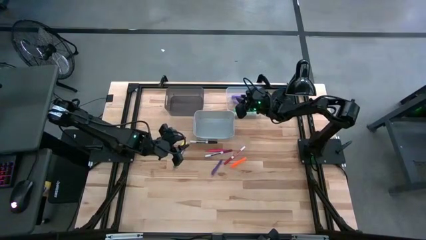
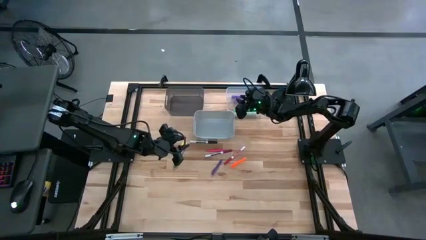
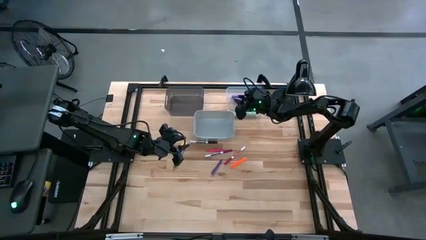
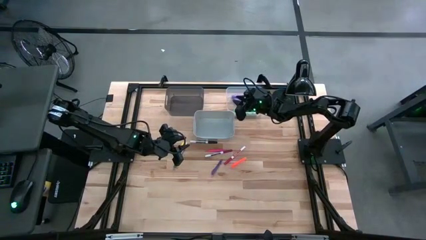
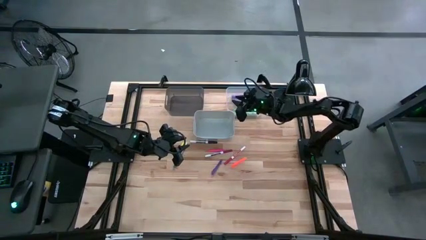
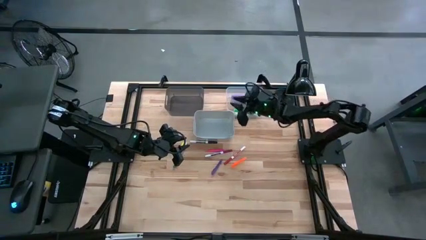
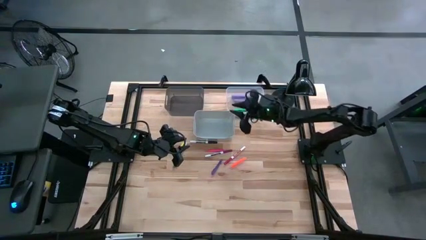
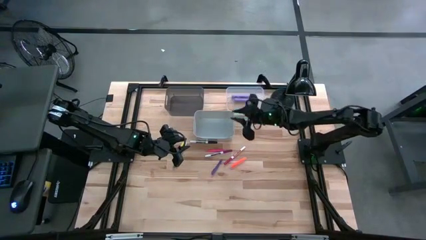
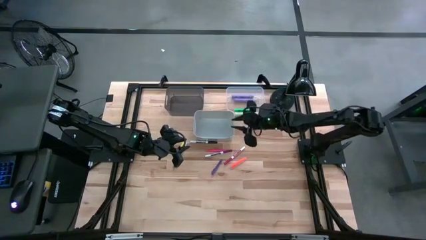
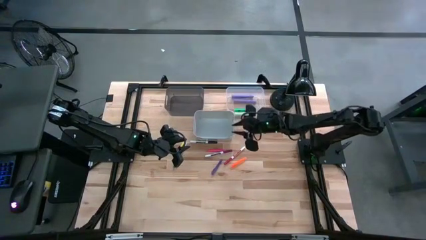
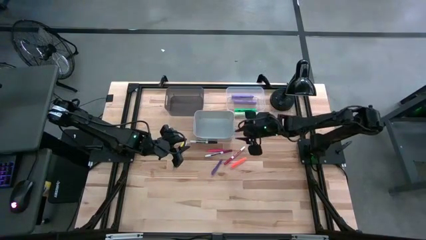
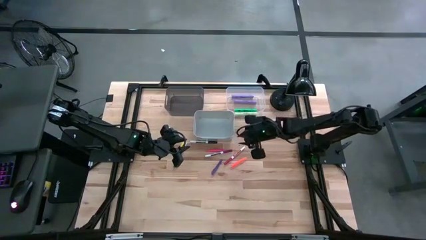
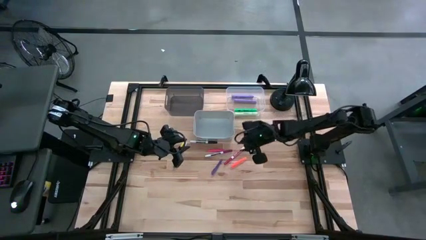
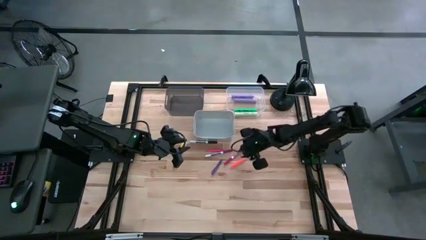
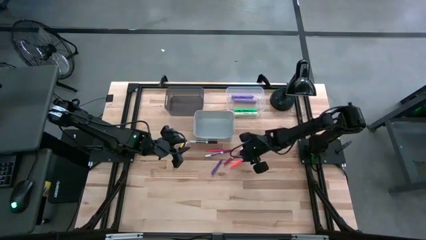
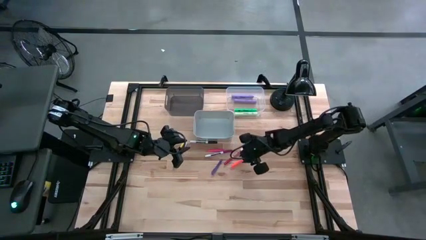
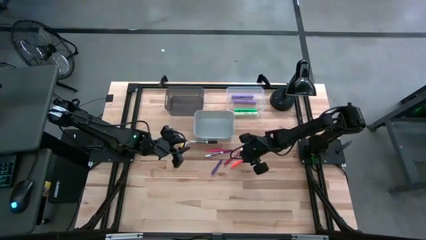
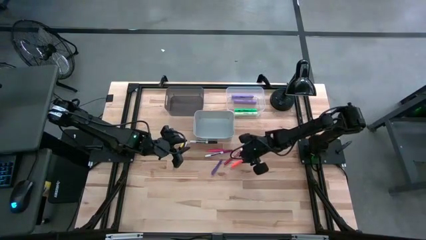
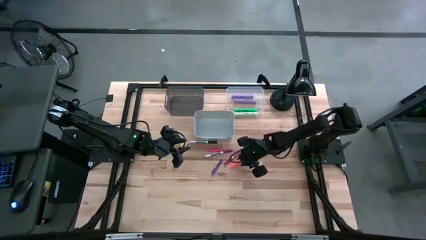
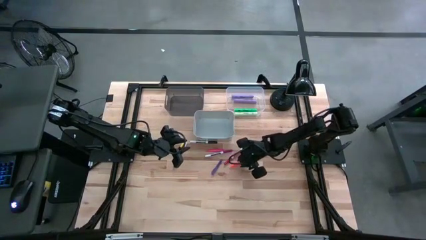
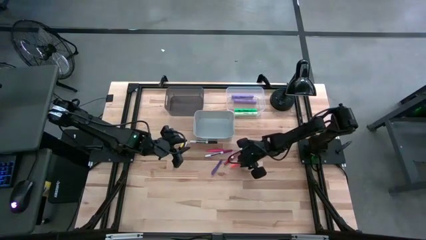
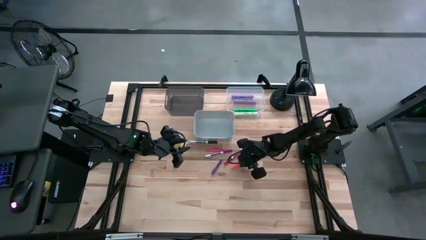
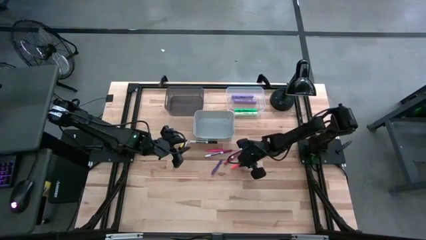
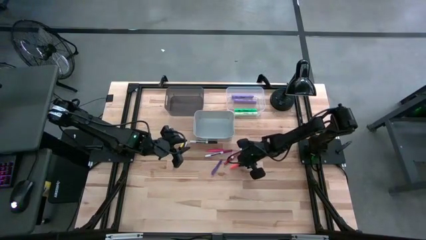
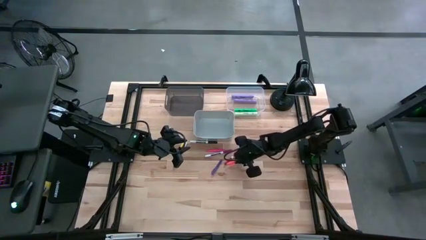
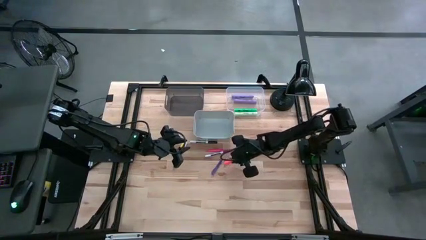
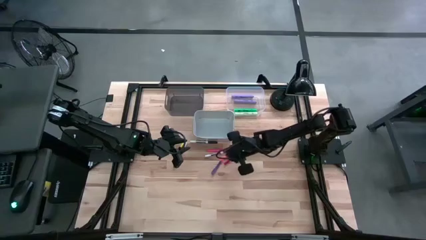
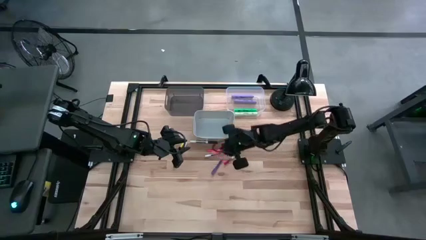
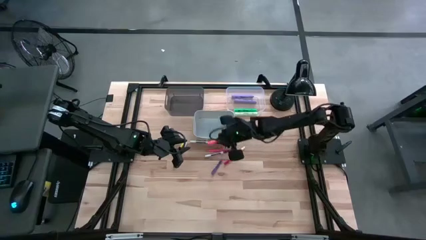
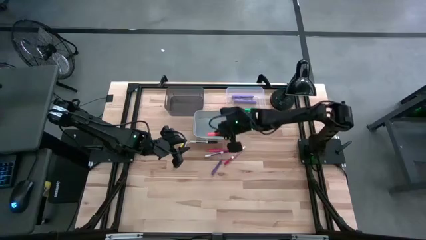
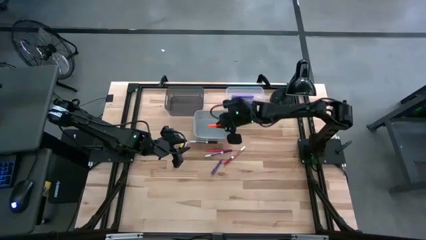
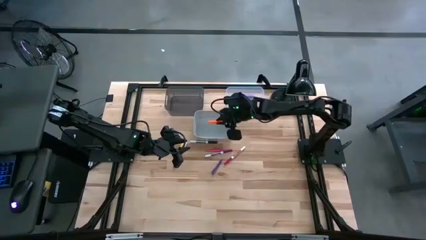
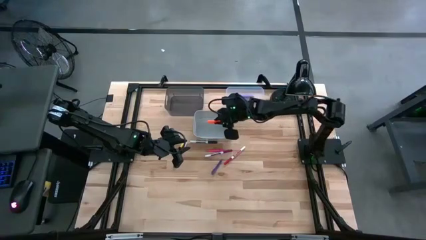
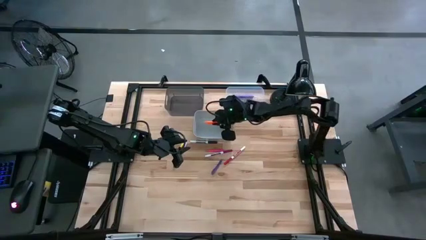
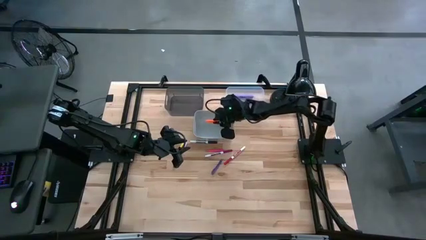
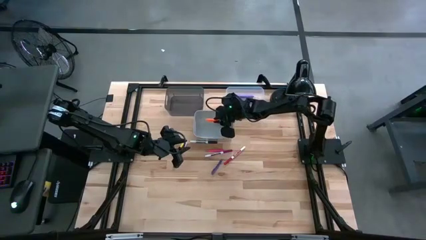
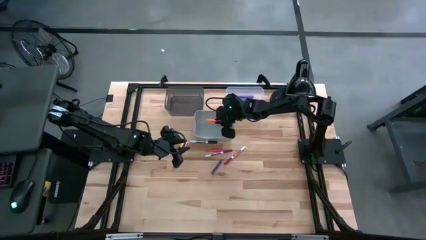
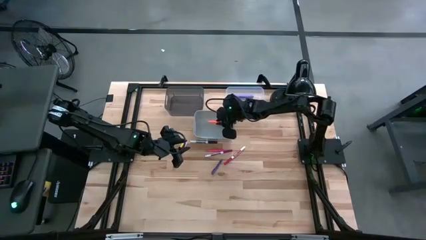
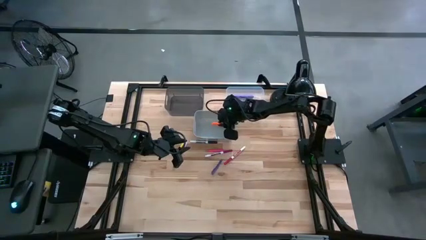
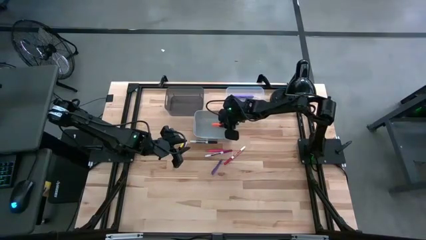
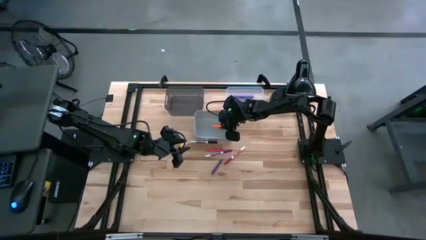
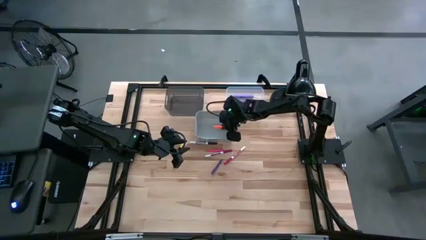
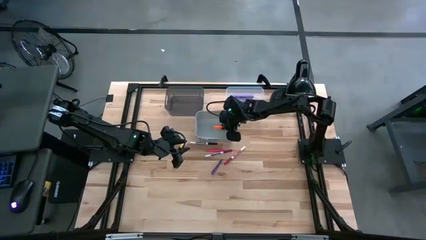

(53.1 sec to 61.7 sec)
Task: Pick & Place Markers
Put the orange pen into the gray bin

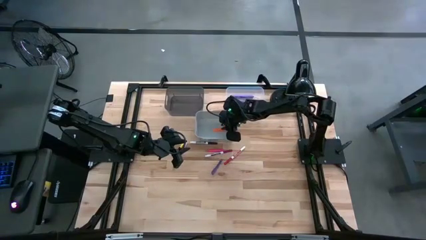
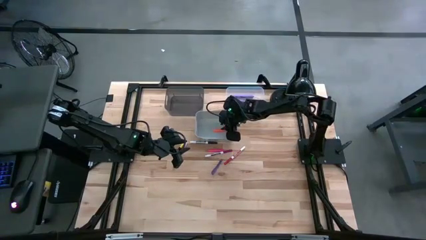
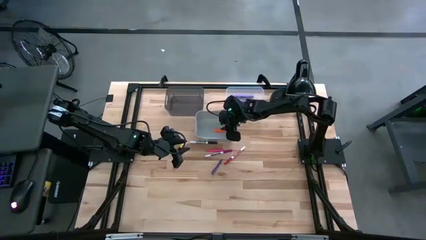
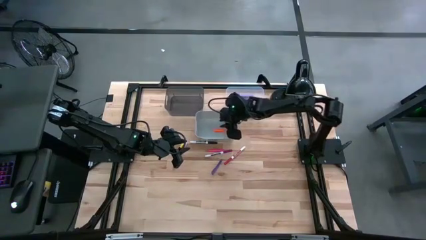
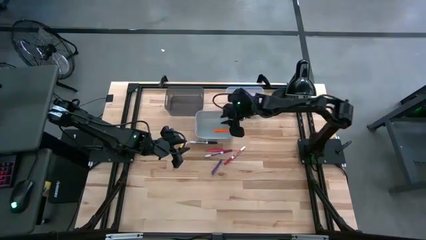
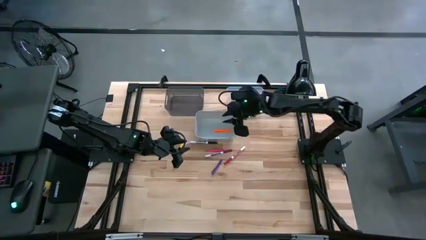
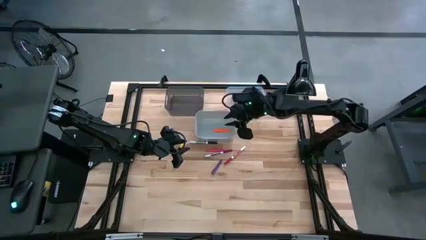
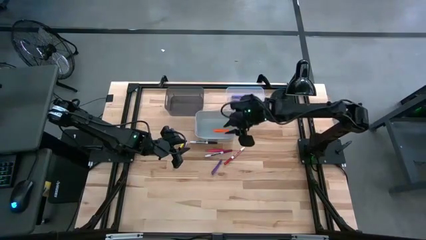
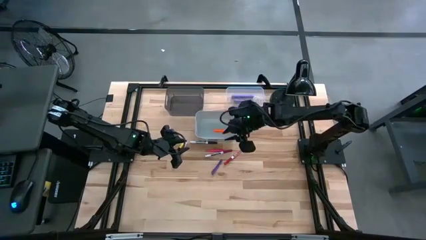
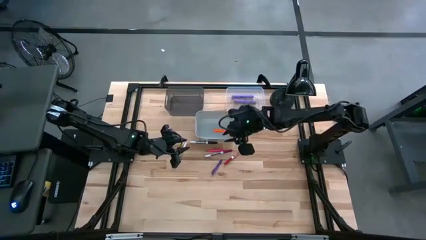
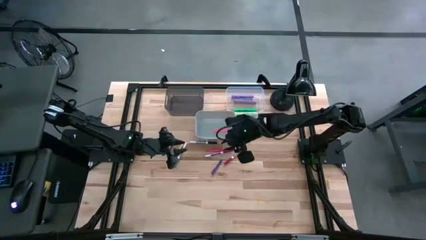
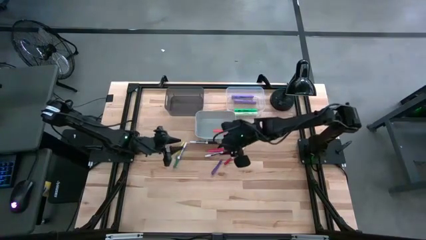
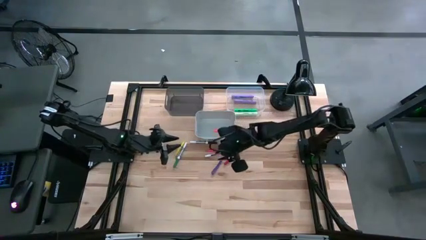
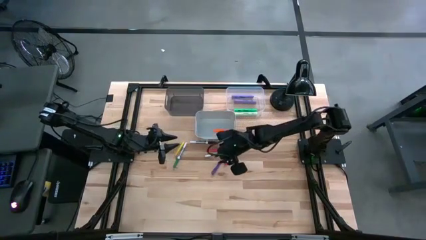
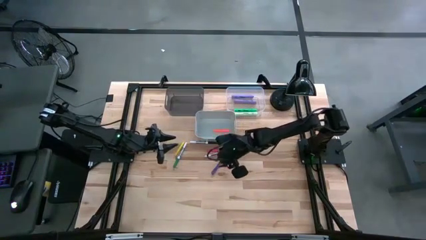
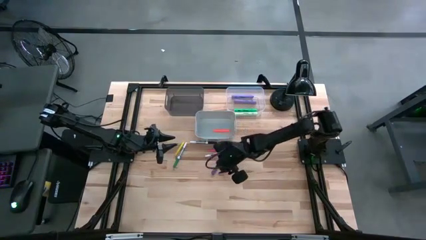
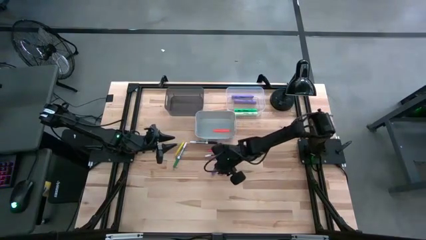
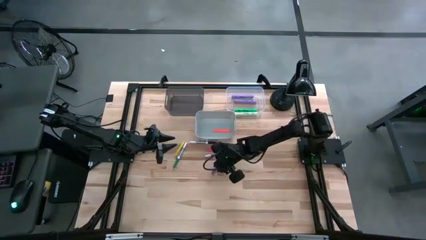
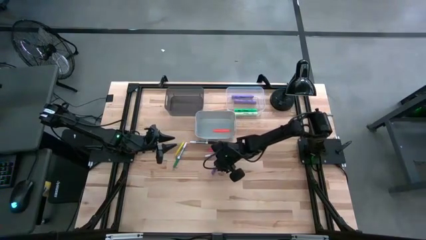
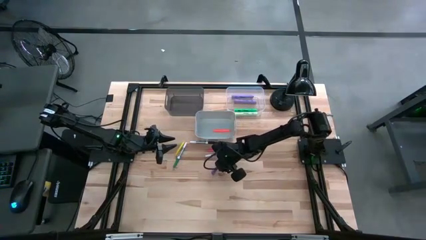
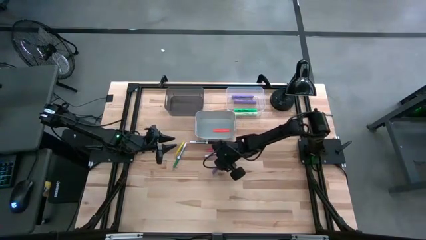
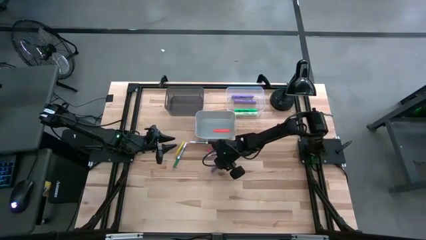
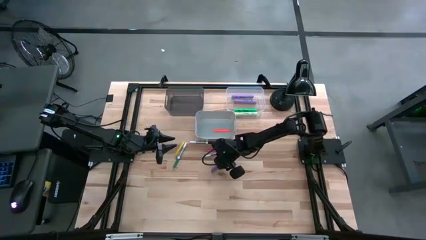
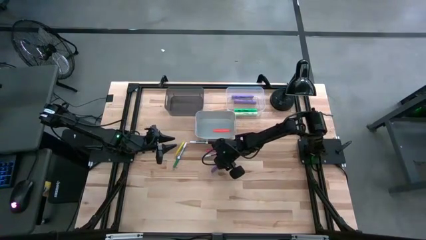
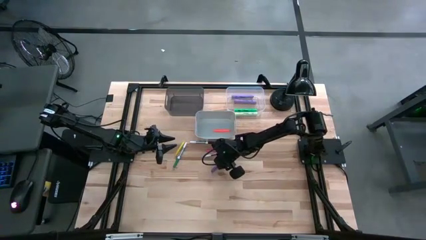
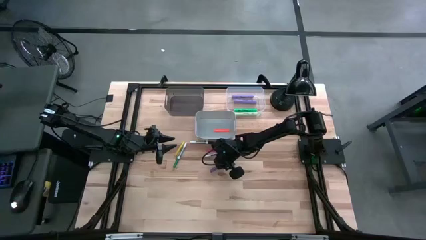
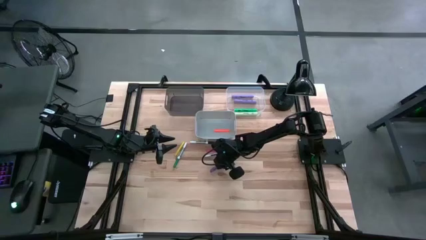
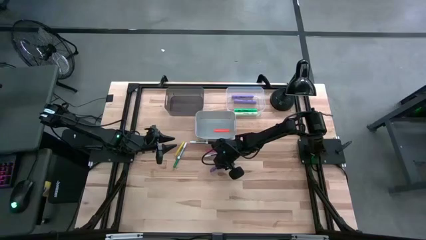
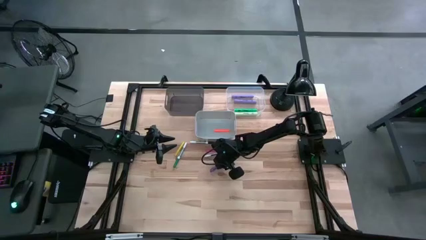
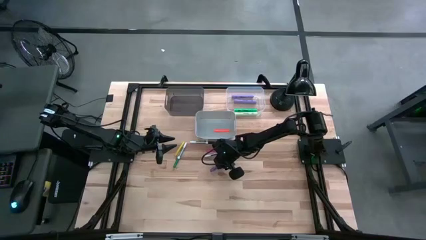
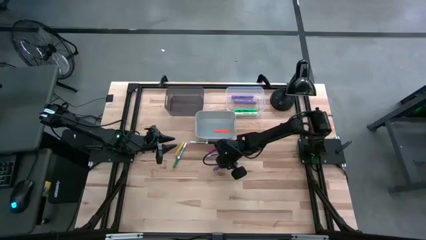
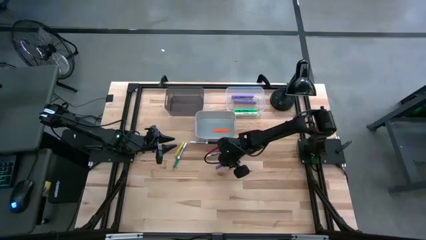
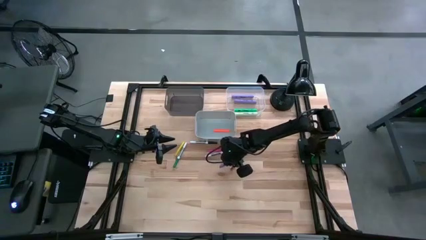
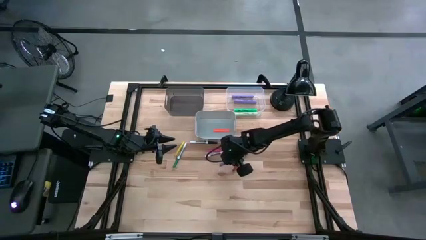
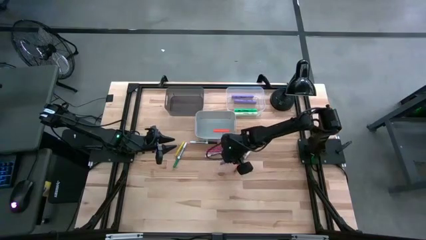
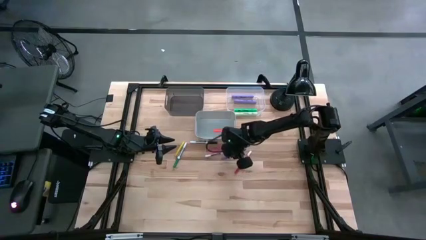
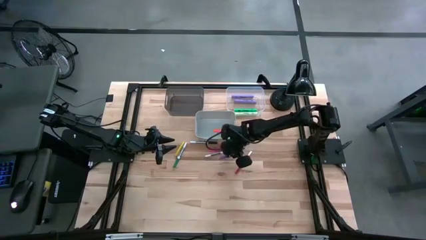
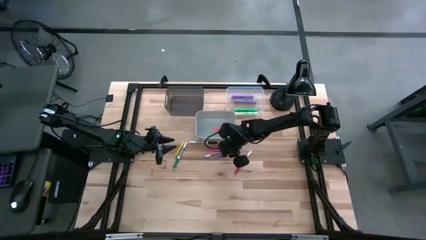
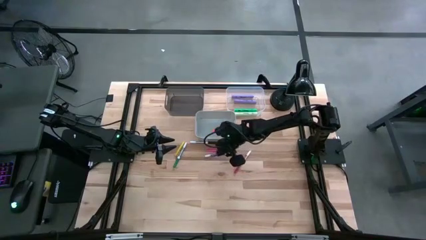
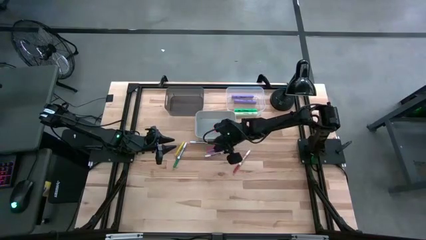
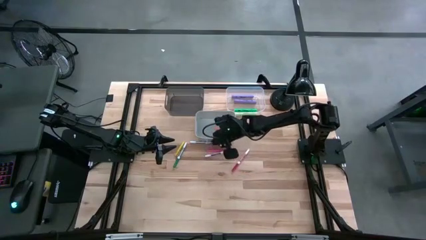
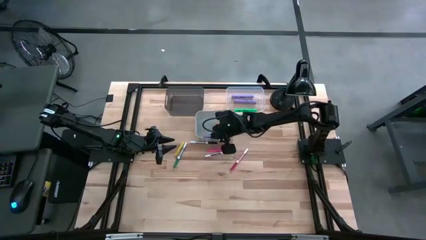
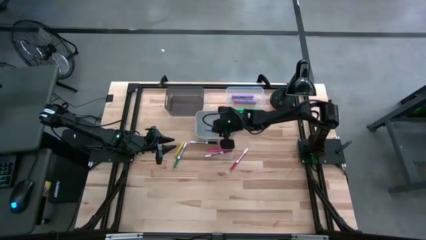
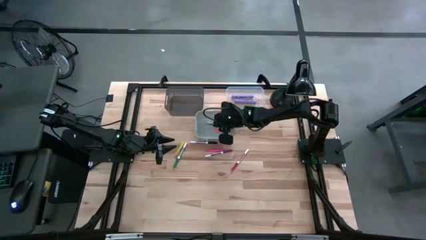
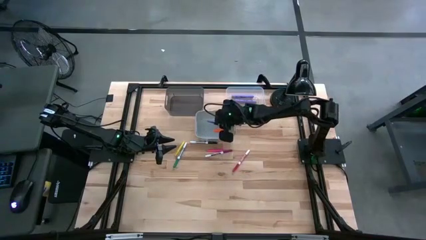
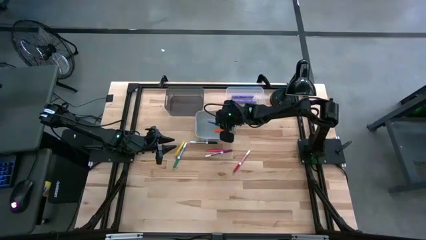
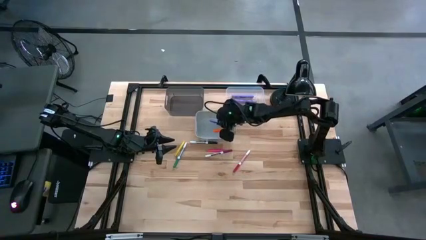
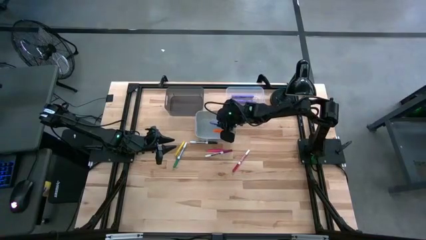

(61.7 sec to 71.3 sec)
Put the purple pen into the gray bin
